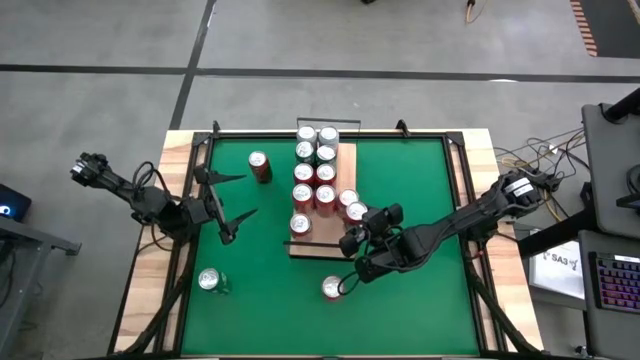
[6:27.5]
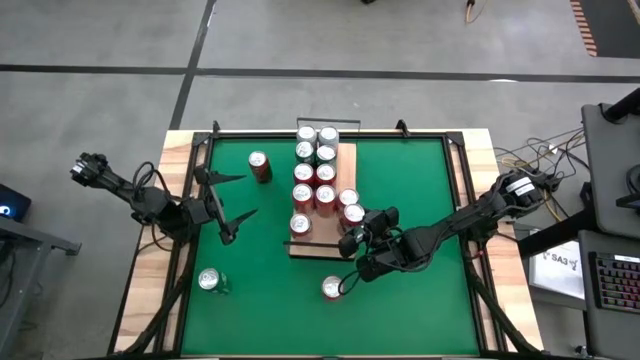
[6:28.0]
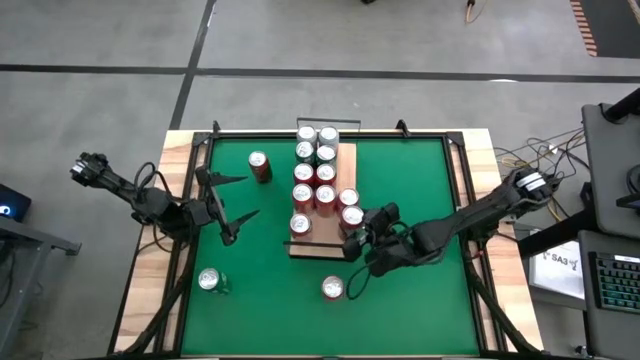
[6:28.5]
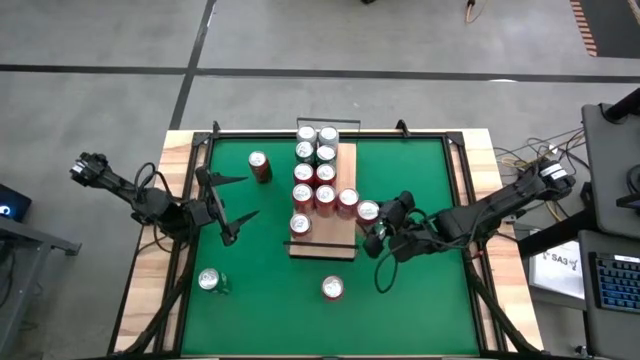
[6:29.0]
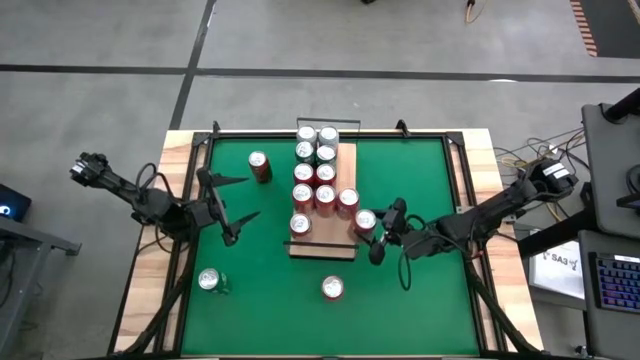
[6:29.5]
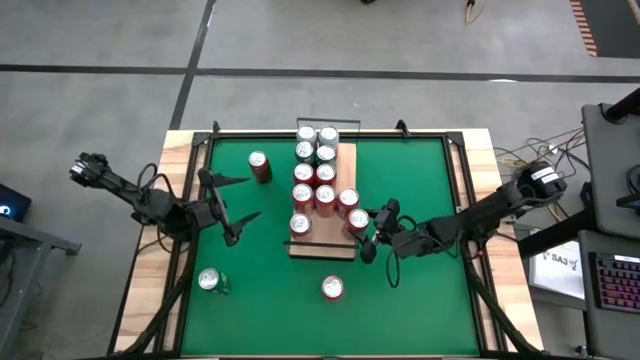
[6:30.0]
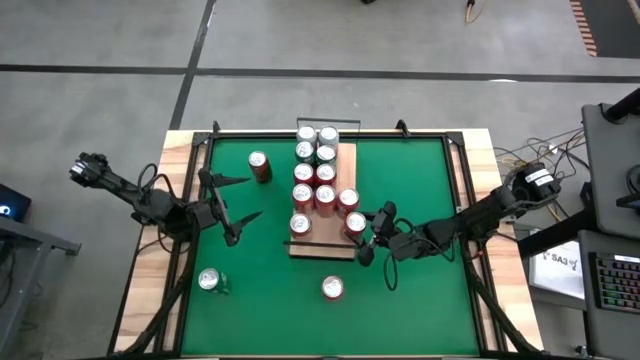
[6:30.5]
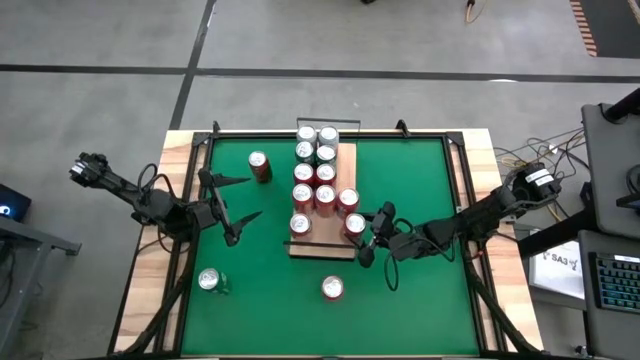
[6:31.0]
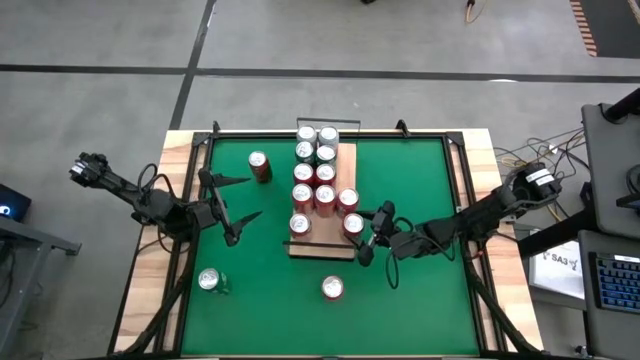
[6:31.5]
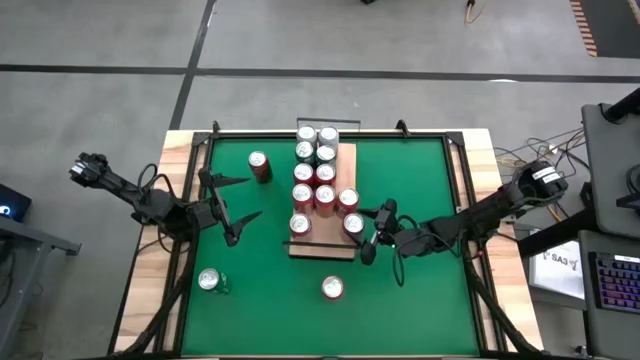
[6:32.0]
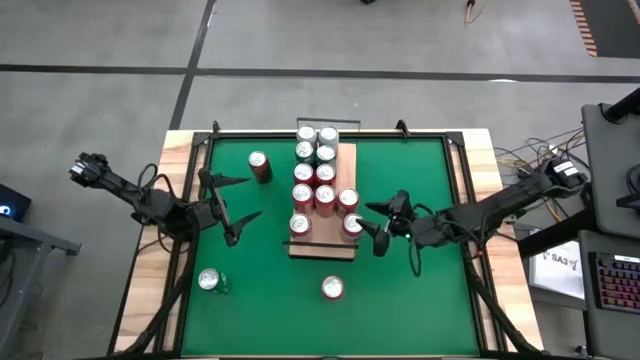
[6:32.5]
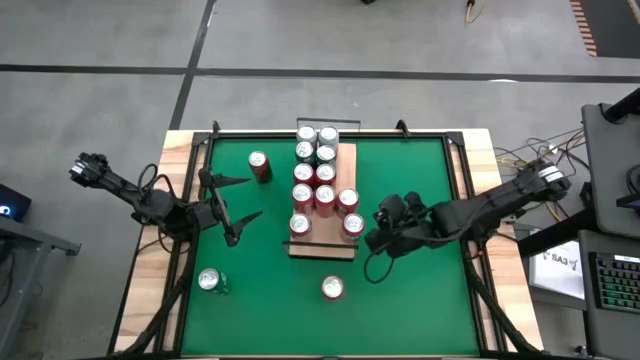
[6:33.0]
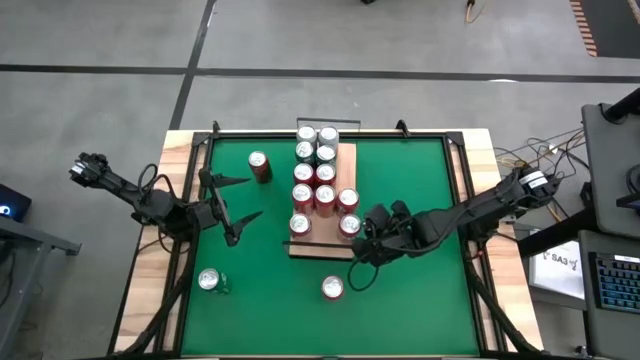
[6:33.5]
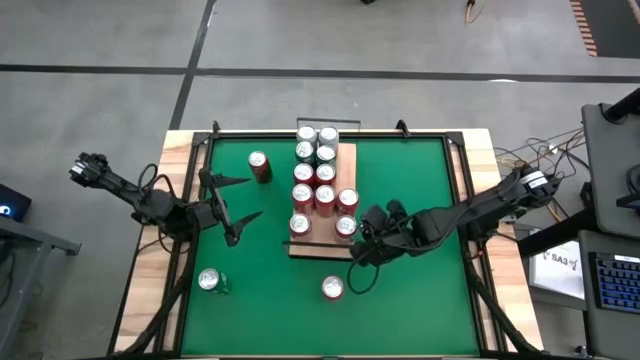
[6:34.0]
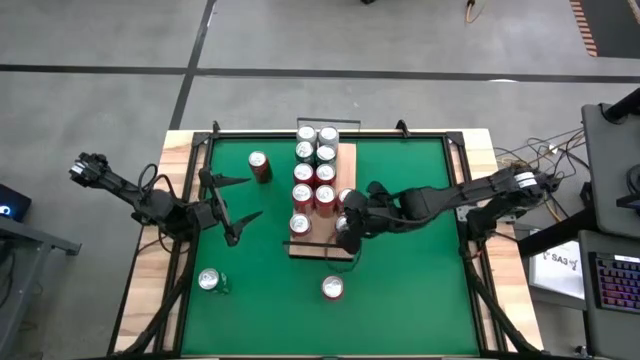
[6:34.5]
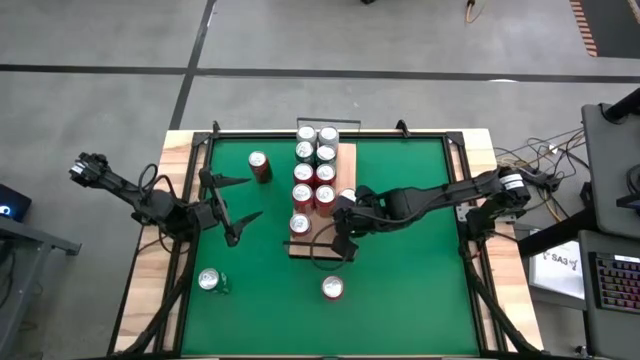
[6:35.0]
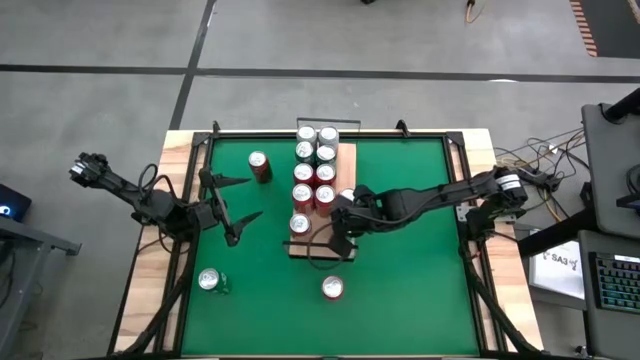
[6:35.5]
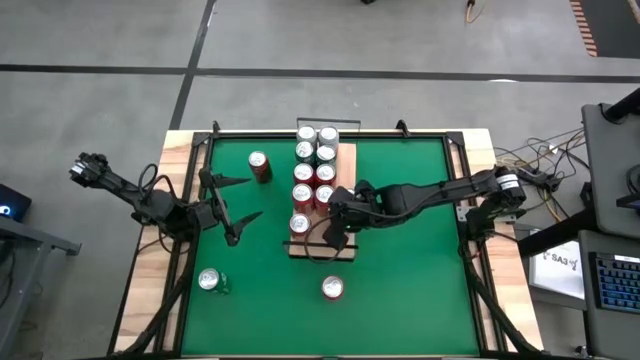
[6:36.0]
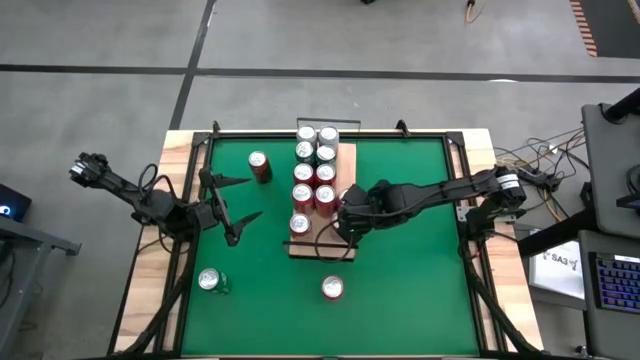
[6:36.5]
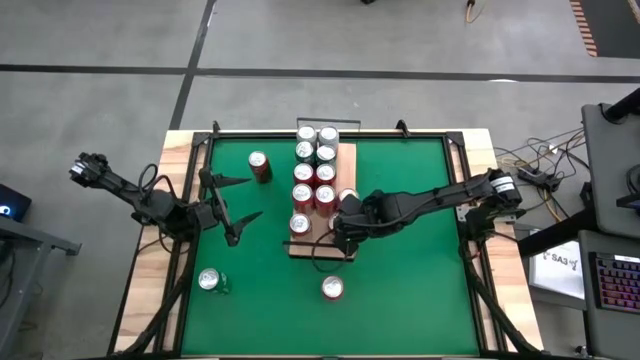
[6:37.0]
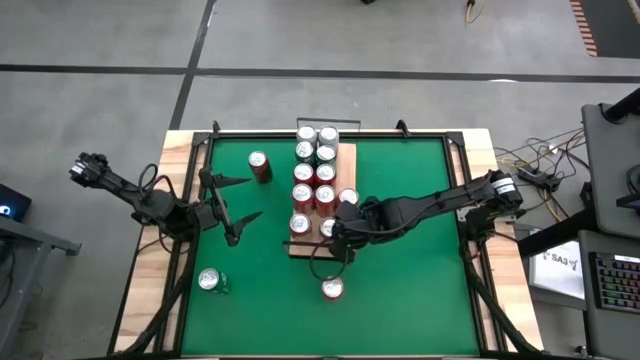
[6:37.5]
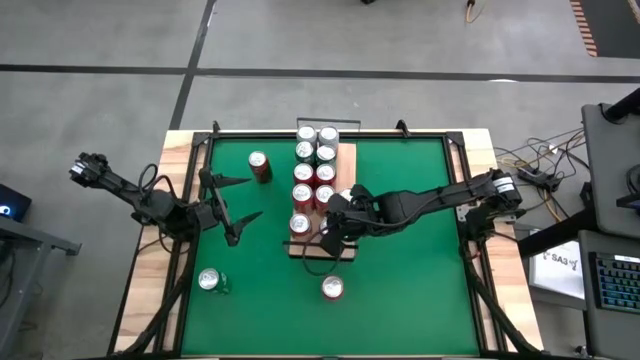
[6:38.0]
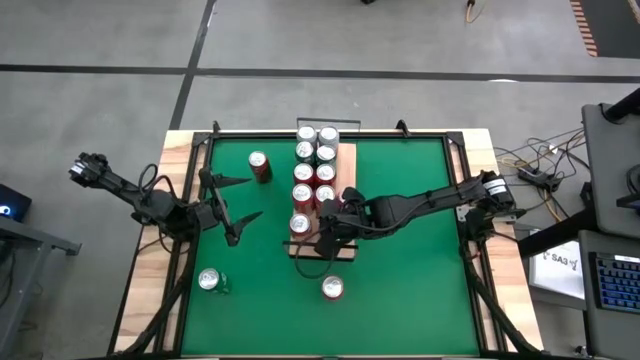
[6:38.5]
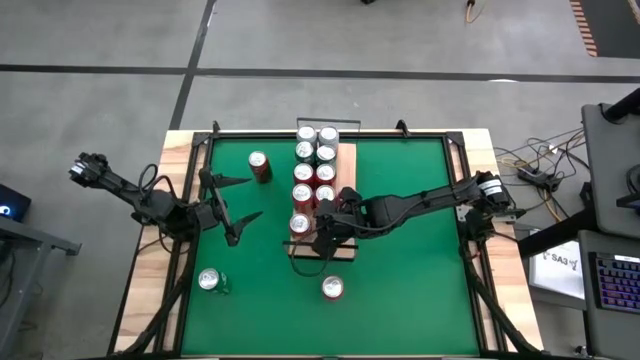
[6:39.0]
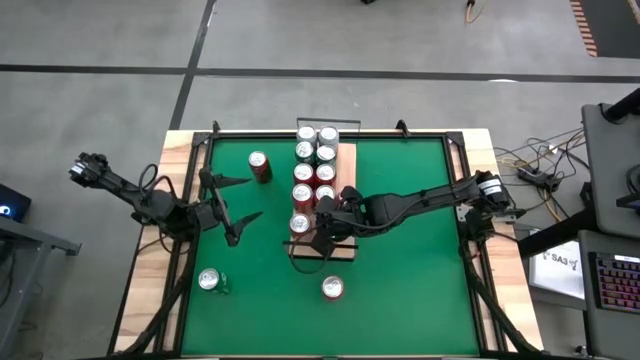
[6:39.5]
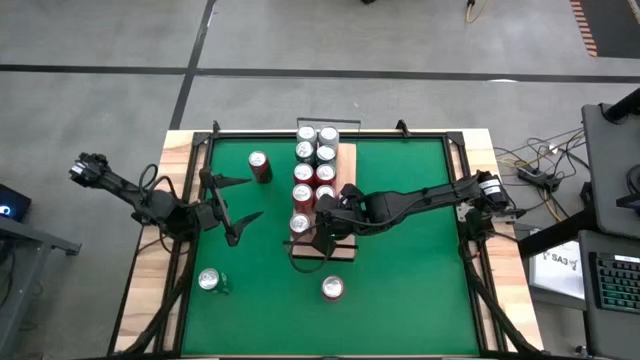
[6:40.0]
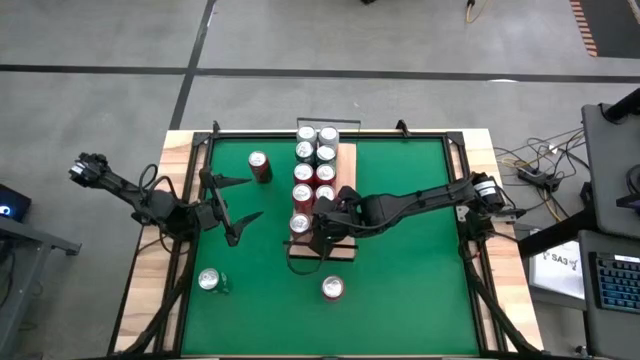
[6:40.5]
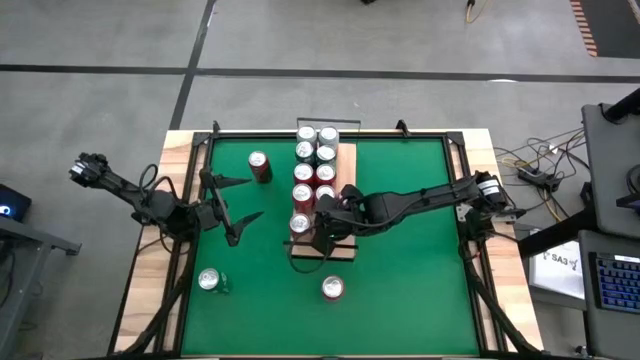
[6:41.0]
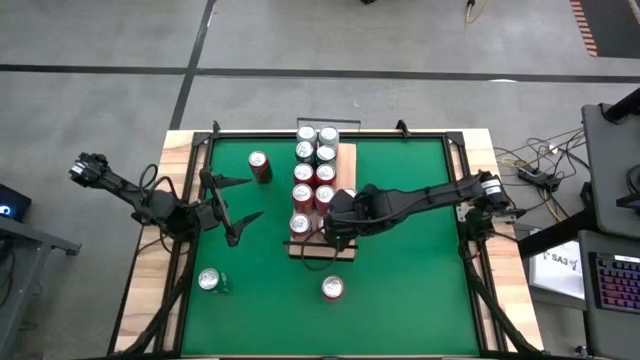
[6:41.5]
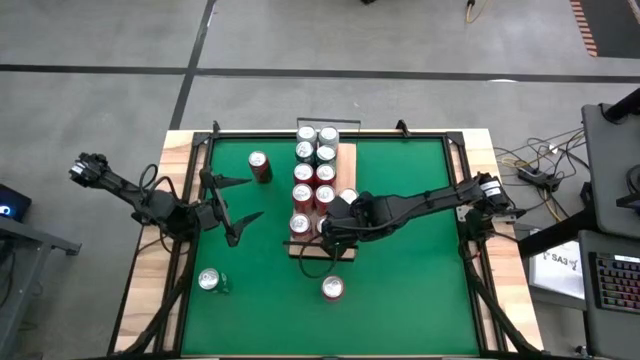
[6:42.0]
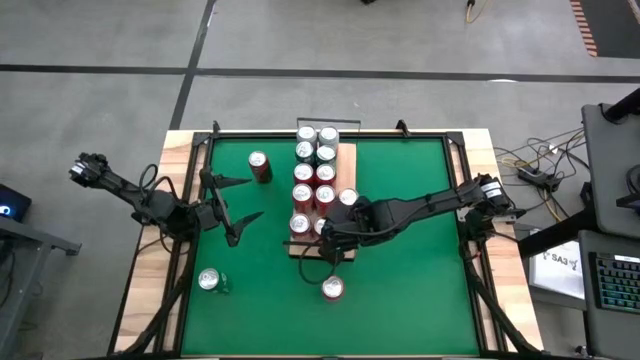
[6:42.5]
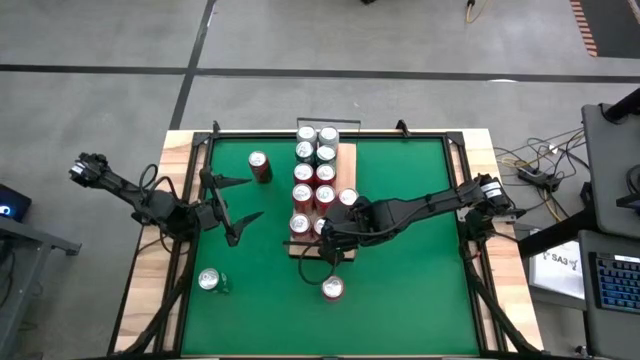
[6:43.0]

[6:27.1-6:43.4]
Task: Place canned beverage on shelf
Put the orange soda can on the shelf and aligned with the other orange soda can

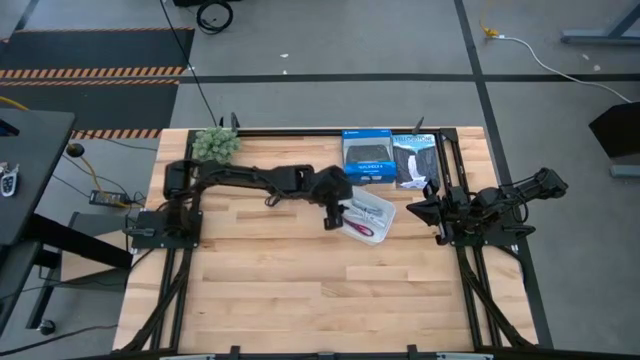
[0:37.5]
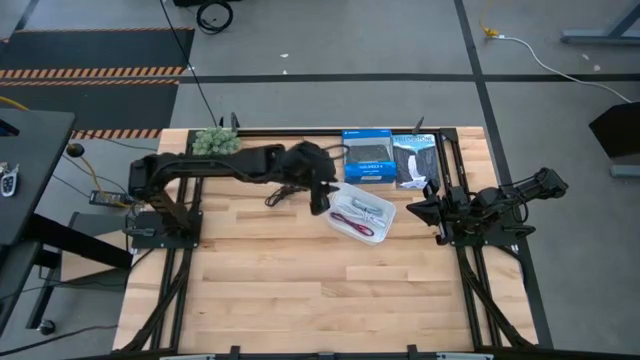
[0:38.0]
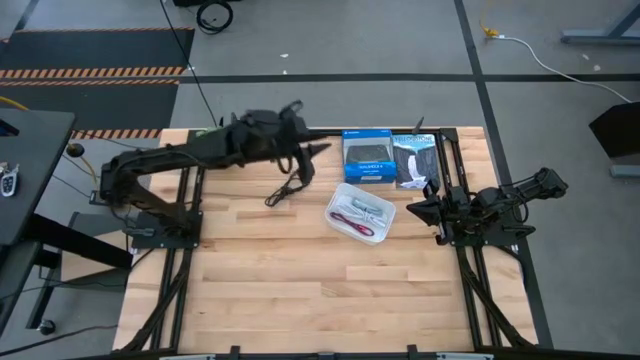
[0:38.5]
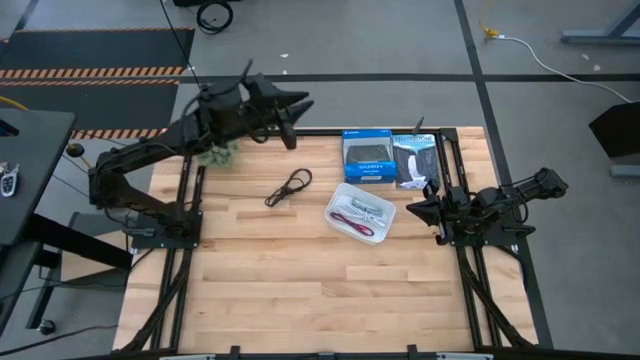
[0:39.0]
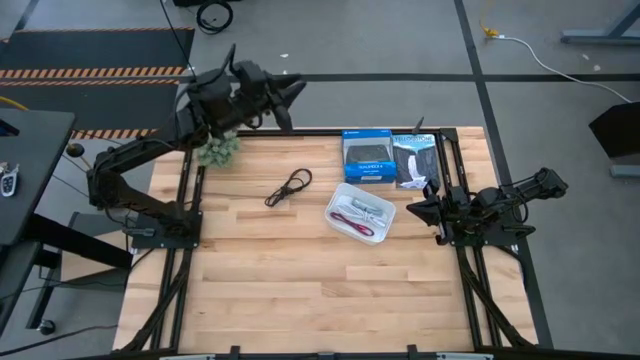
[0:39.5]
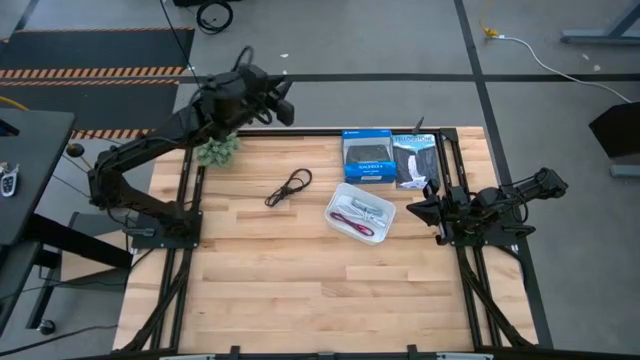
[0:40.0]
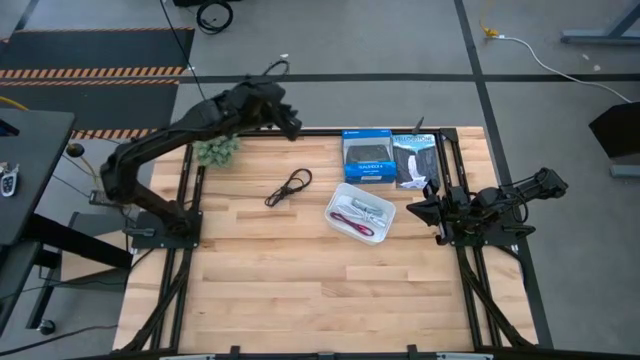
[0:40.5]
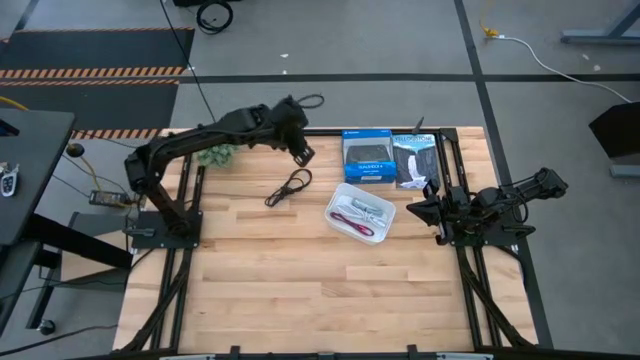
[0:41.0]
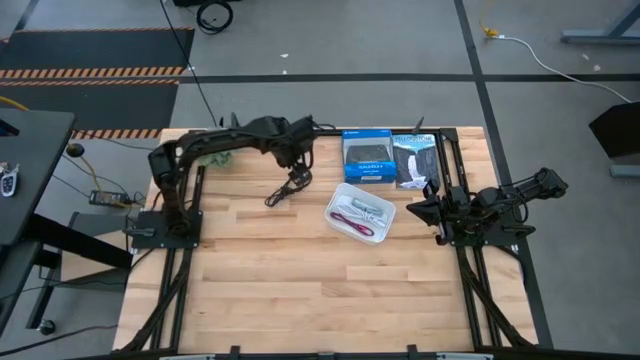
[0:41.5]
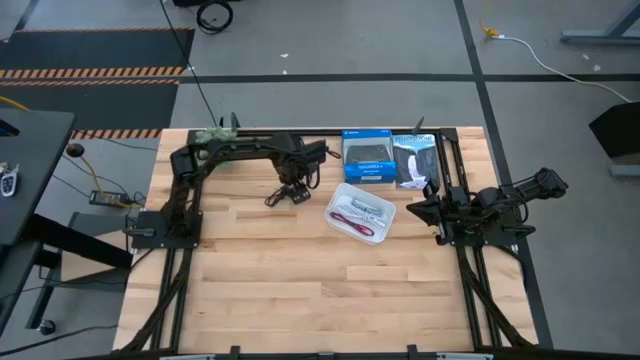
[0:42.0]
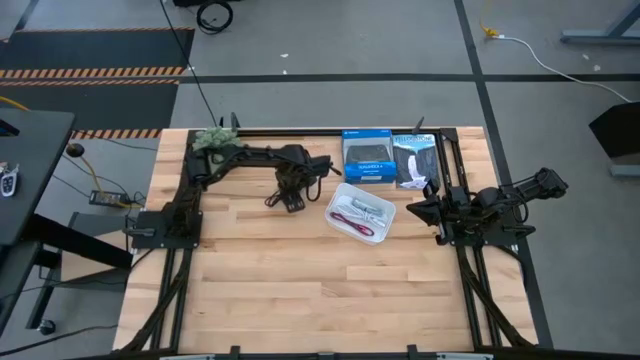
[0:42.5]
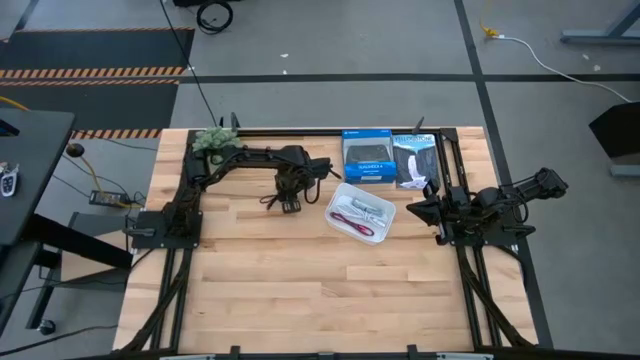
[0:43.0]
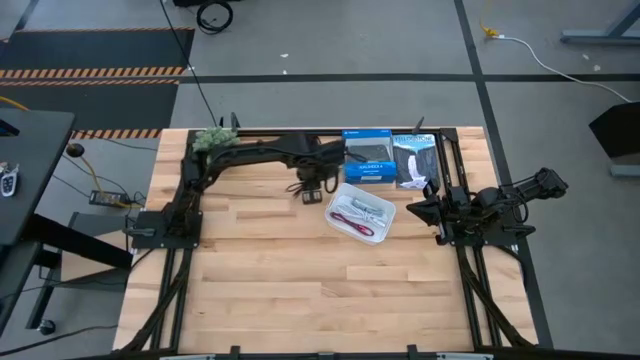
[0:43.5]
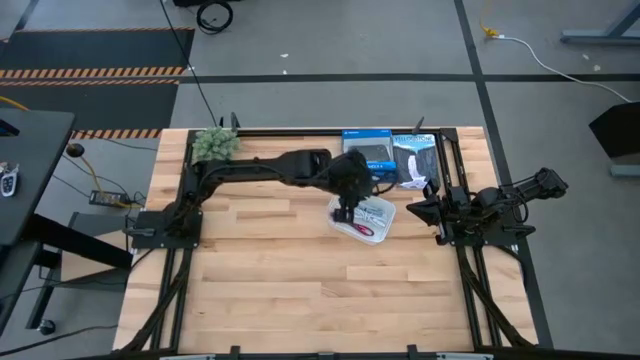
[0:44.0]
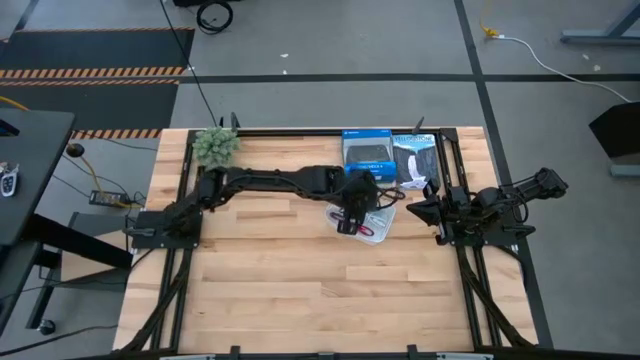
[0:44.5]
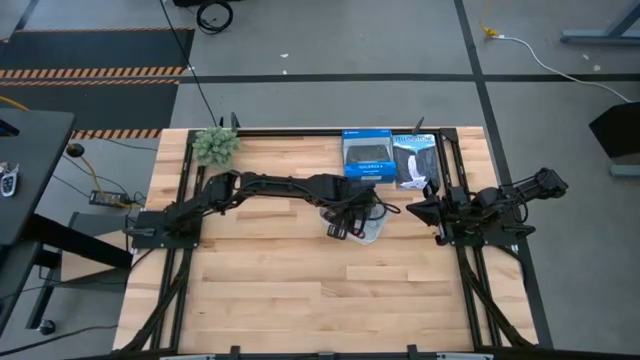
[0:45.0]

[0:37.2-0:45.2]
Task: Pick and place USB-C Cables
Put the black charger cable into the white bin
